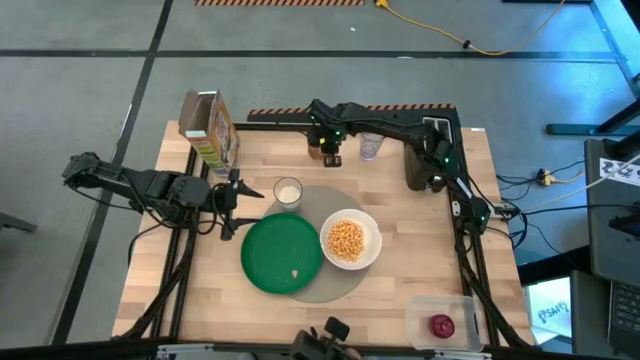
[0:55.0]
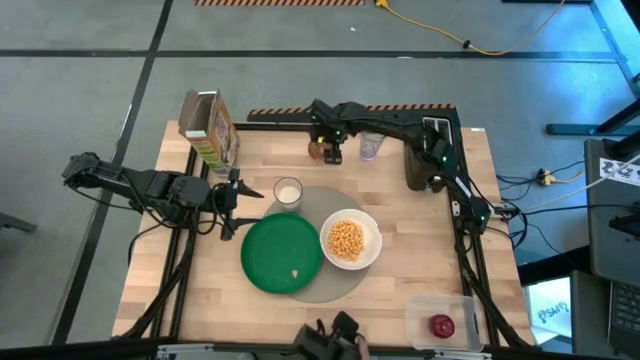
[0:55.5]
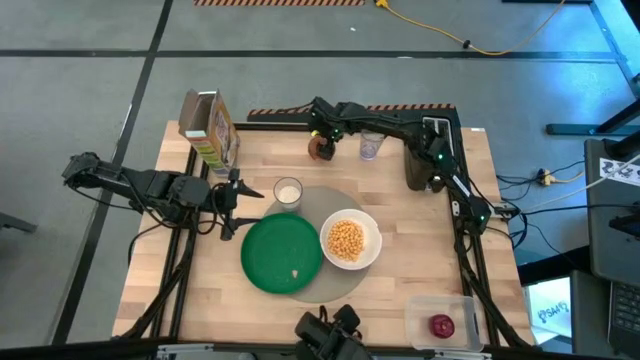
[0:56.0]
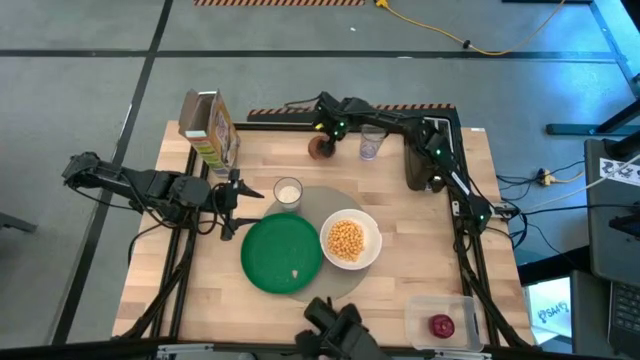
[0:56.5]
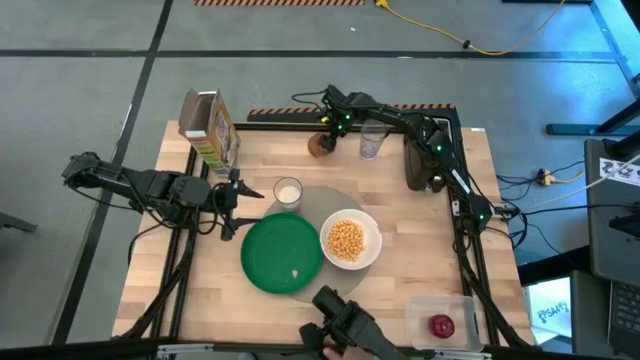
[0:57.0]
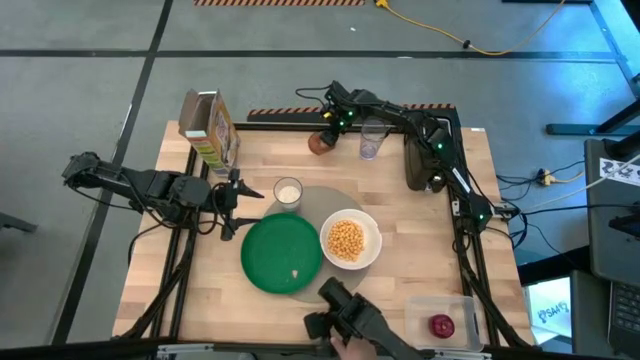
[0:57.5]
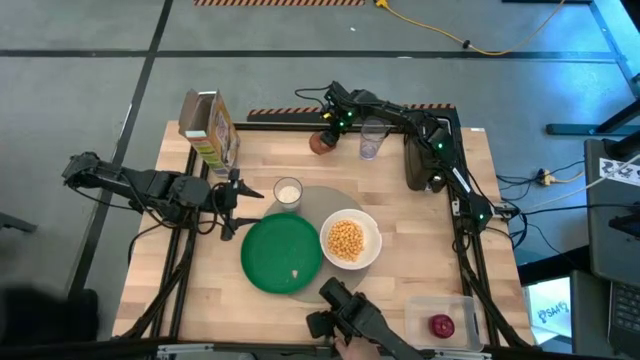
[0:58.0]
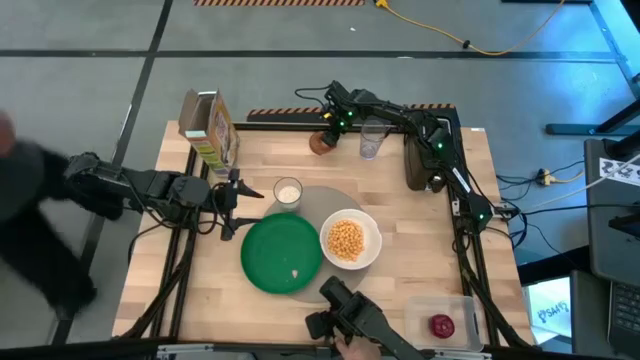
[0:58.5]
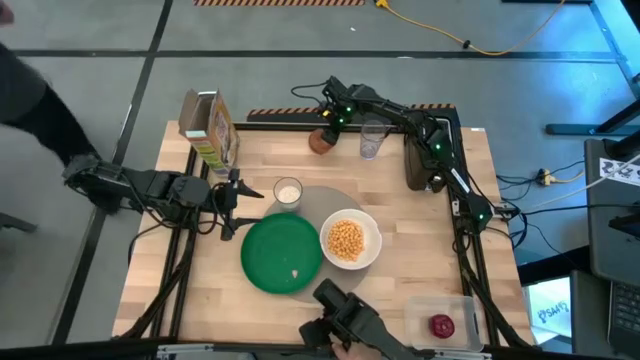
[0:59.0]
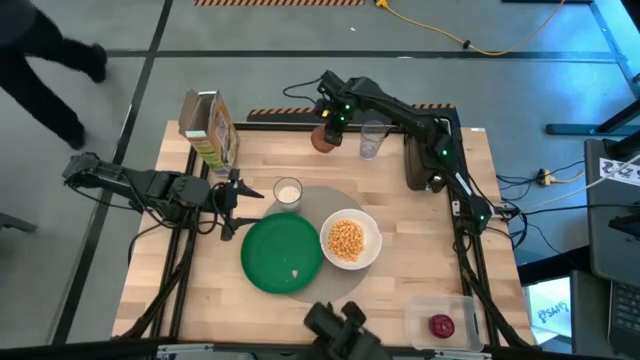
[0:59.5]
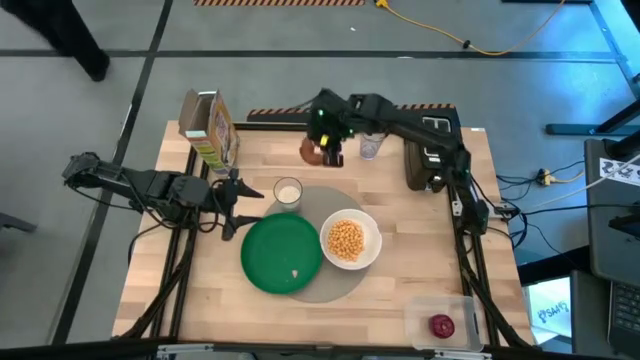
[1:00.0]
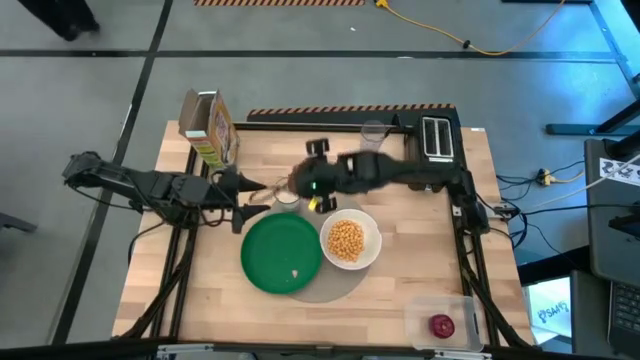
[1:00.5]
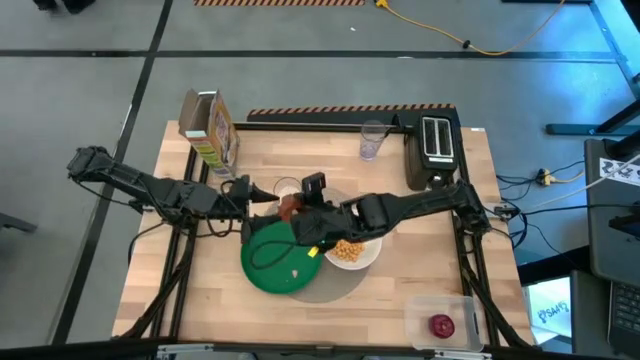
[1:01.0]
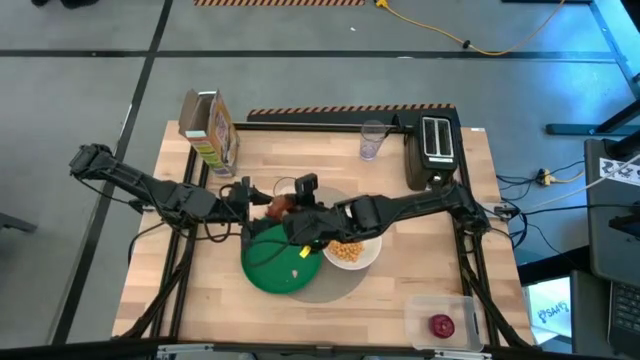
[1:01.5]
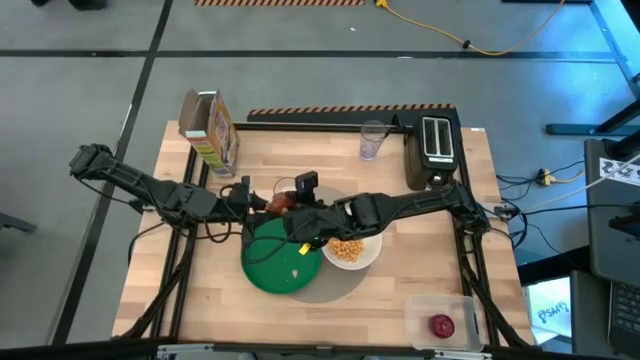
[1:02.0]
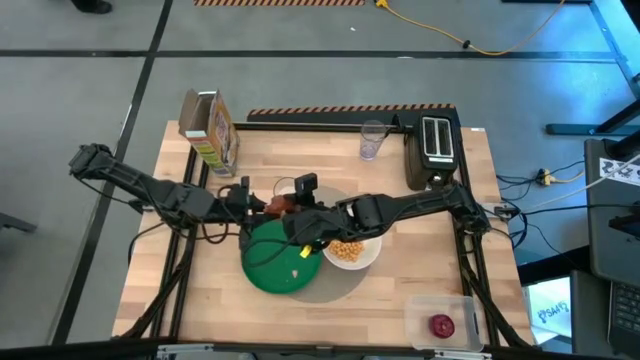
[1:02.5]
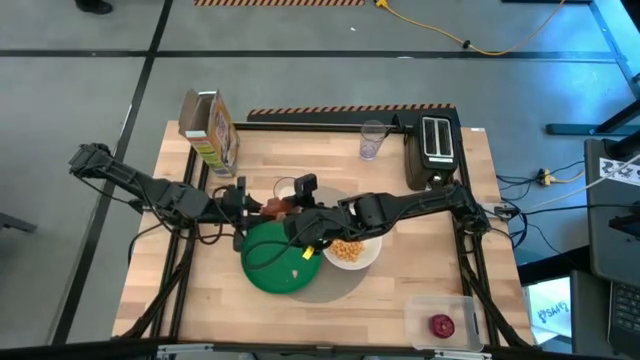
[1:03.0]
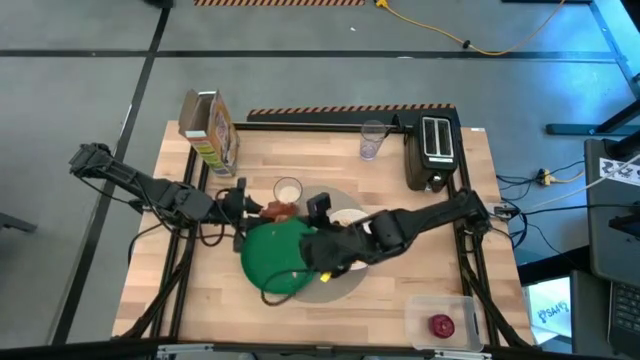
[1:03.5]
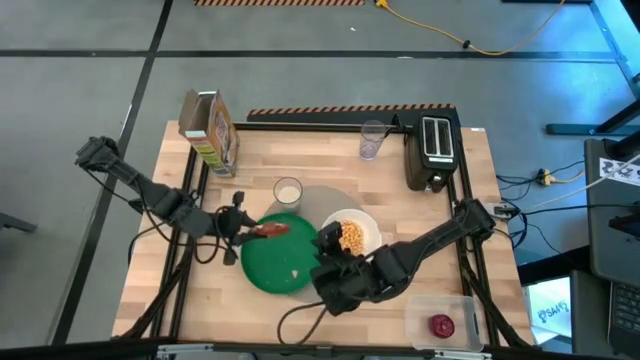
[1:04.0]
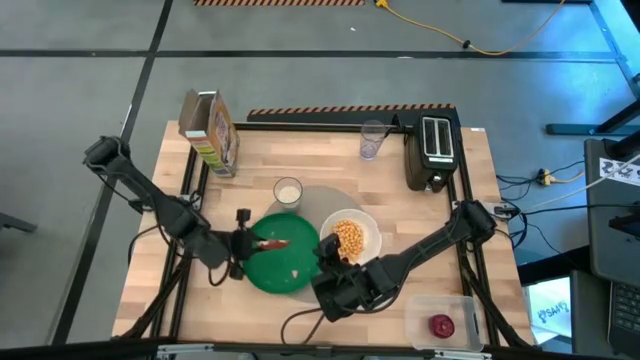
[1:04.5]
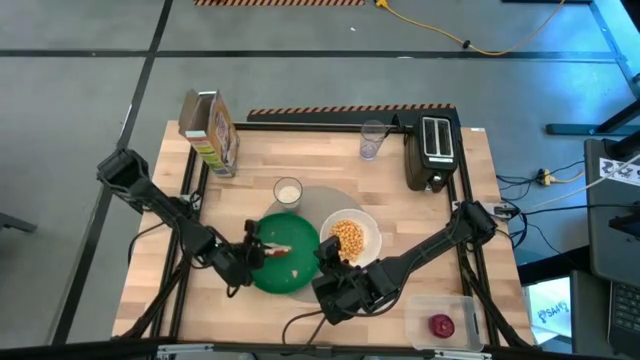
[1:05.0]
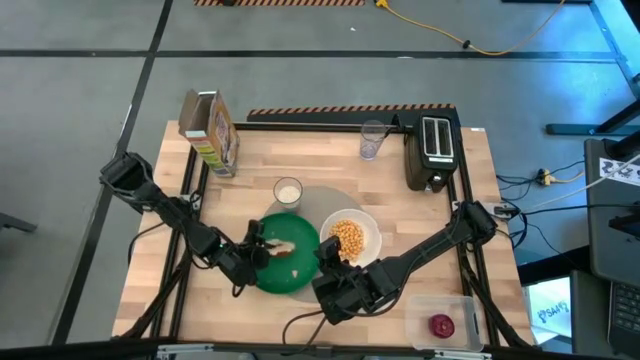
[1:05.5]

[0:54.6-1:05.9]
Task: Arrange a breakfast setting
Put the toasted bagel on top of green plate

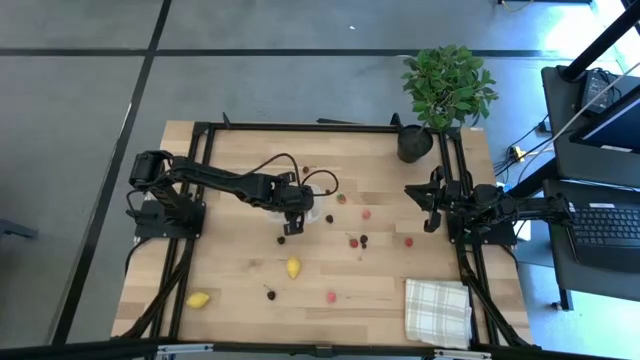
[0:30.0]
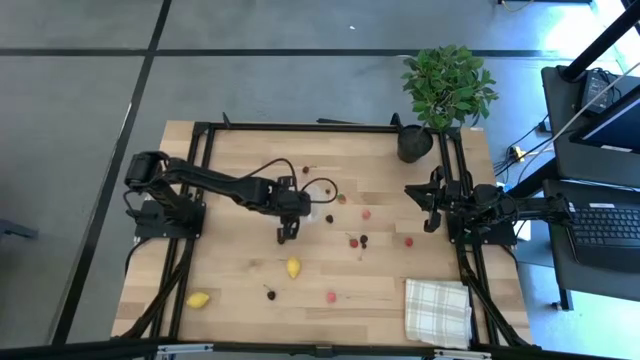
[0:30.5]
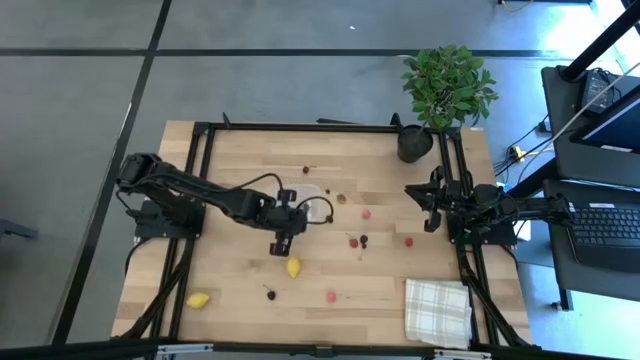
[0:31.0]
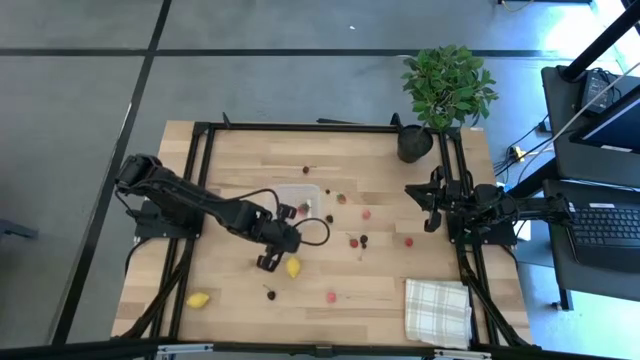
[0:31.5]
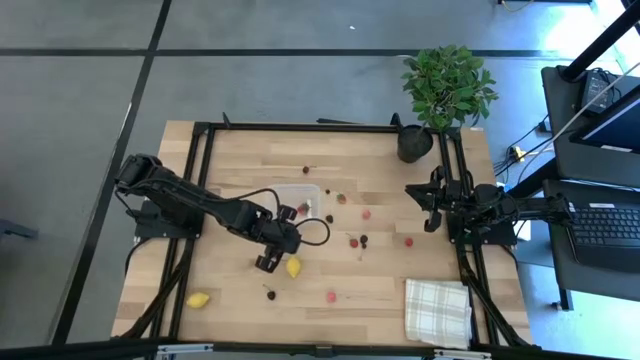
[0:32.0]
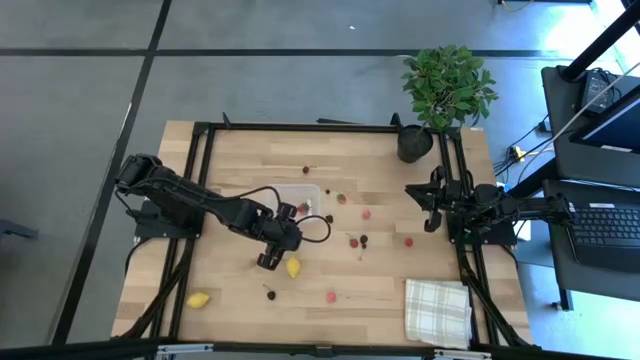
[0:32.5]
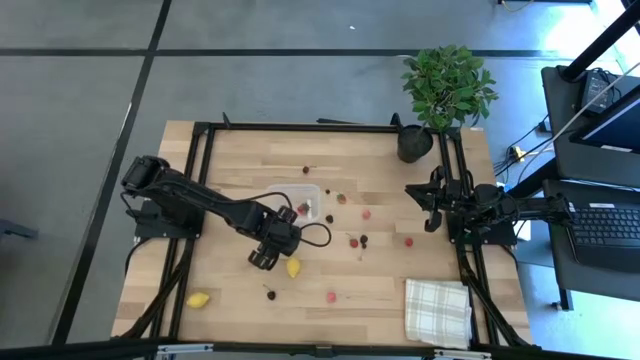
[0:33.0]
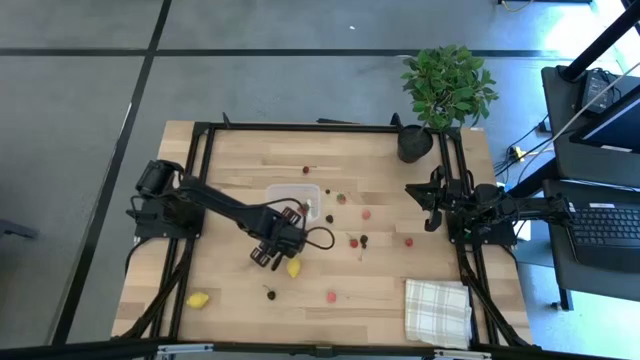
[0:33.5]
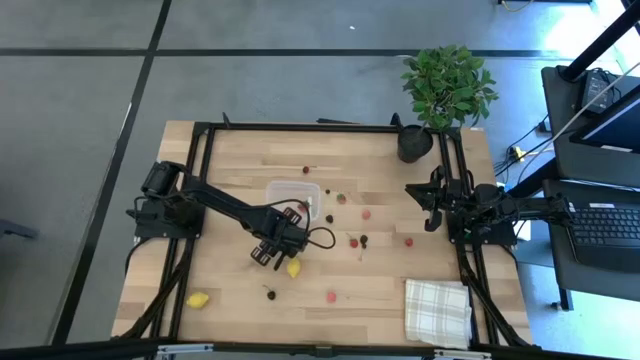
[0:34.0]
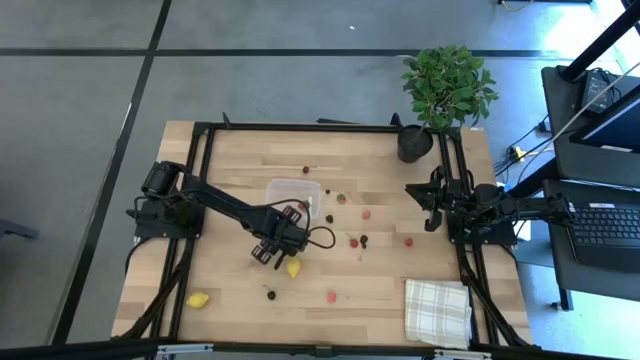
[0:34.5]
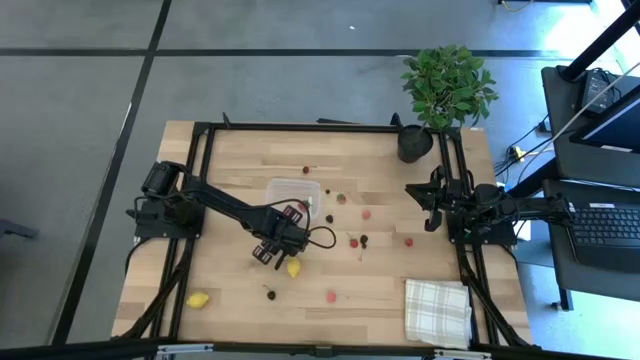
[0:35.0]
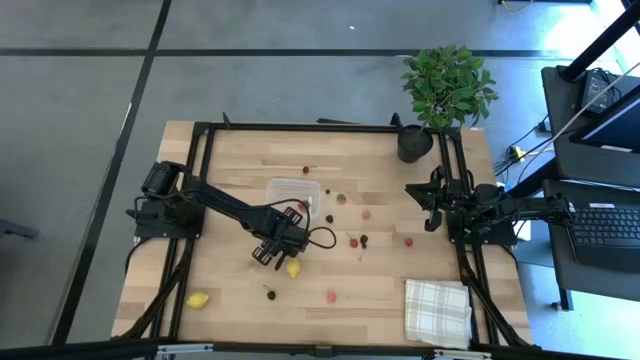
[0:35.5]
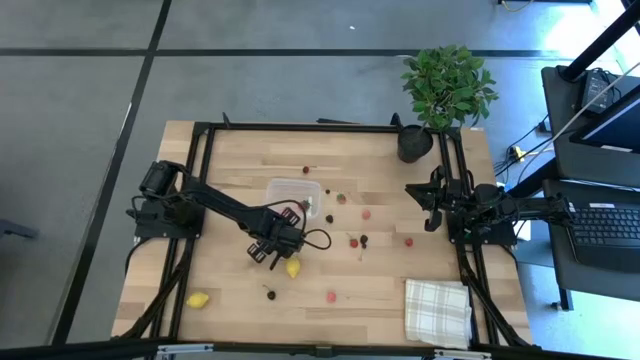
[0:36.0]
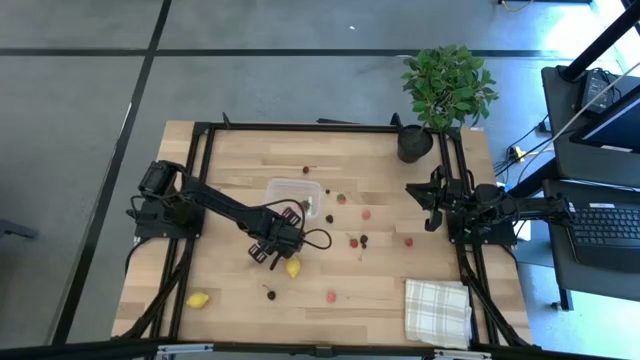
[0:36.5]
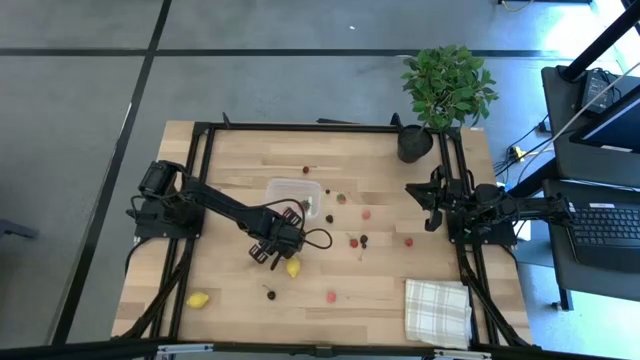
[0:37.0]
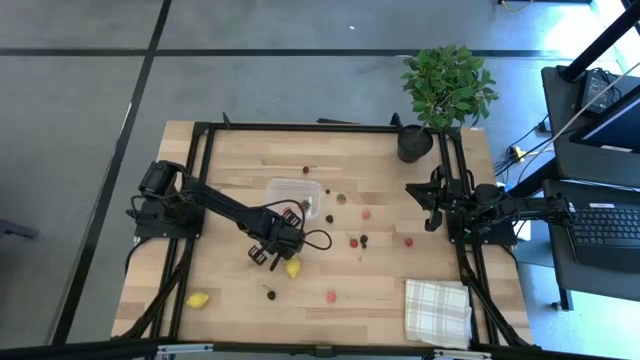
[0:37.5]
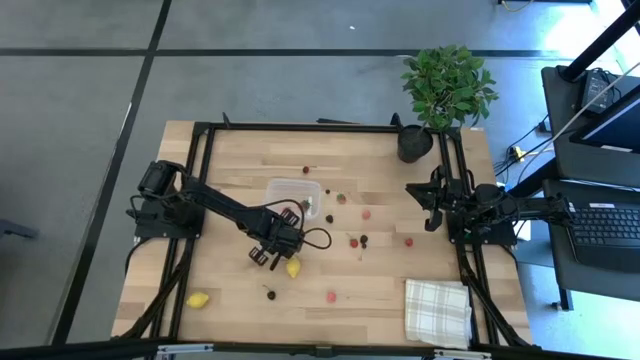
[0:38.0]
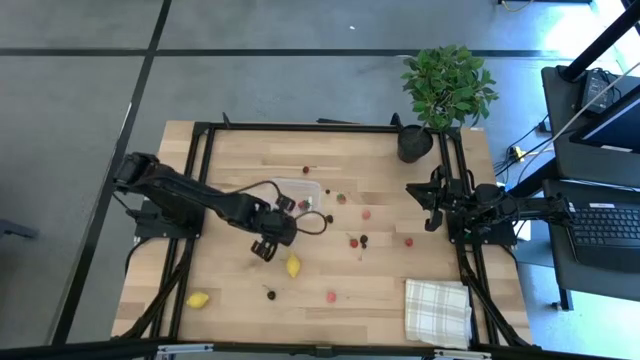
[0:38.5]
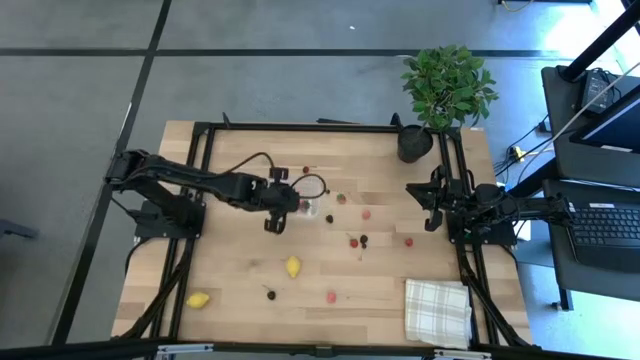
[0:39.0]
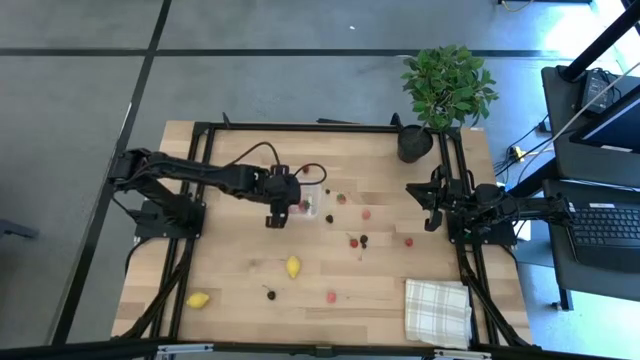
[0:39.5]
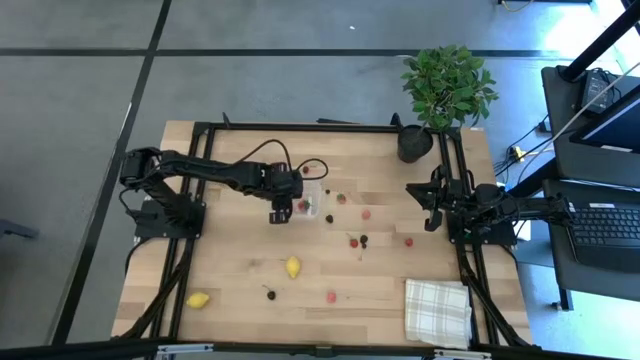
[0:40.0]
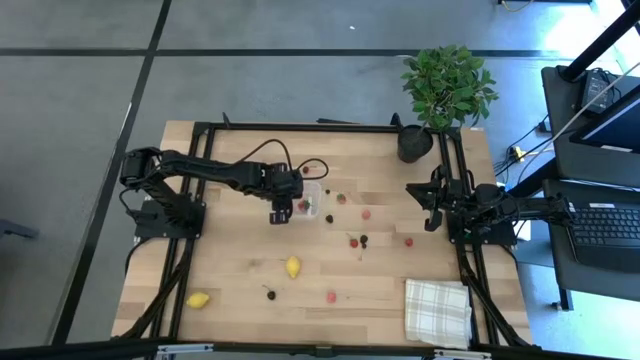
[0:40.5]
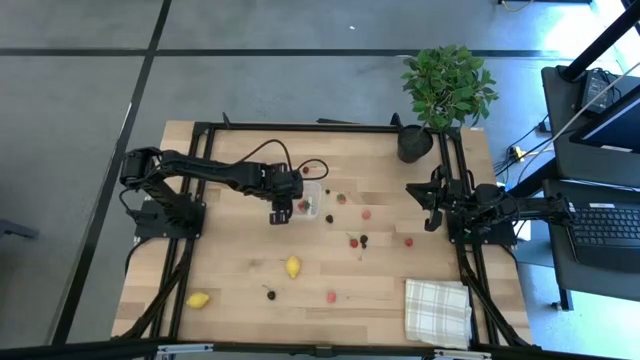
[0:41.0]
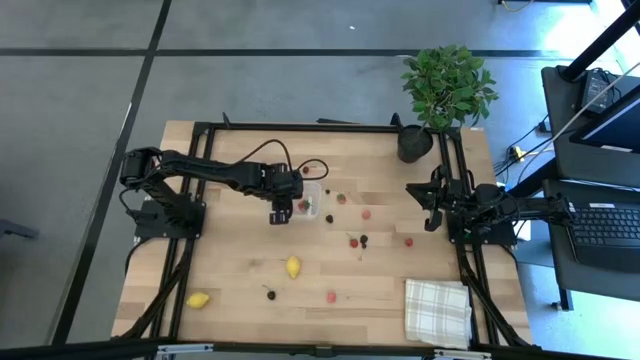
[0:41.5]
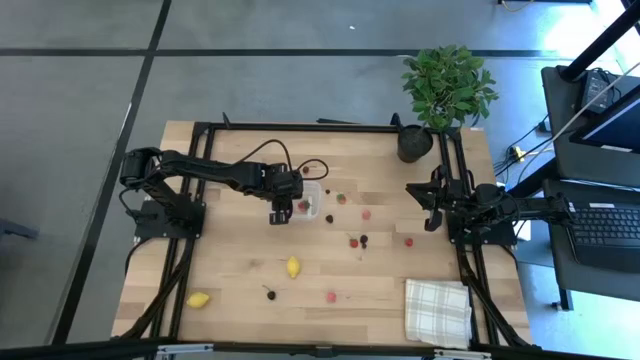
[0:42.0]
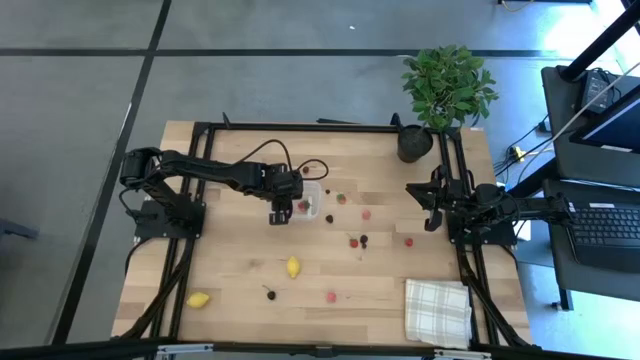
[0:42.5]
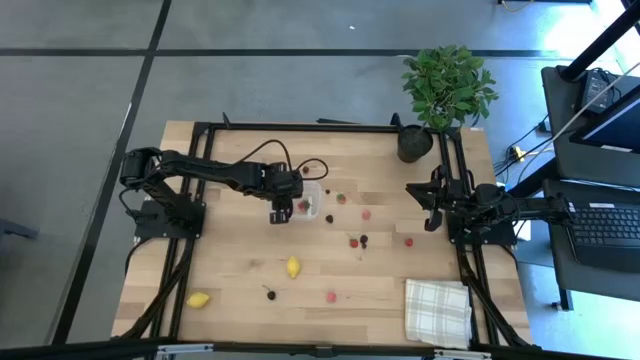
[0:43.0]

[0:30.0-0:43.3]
Task: Pick and placing Produce into tupperware
Put the top black cherry in the transparent bin
